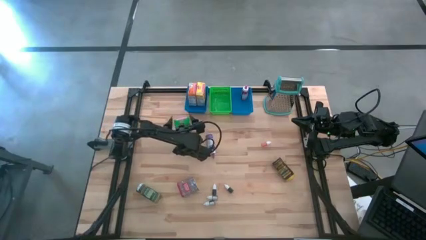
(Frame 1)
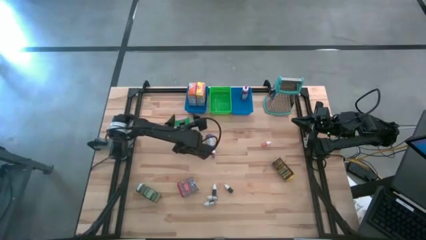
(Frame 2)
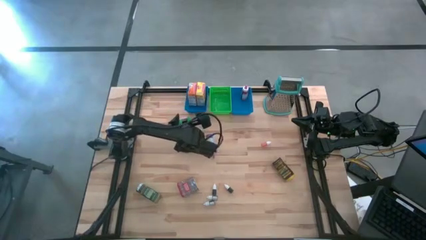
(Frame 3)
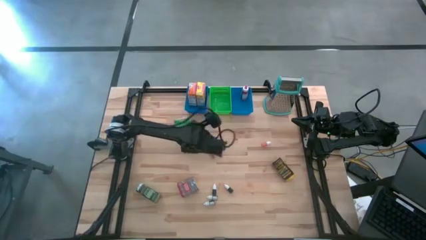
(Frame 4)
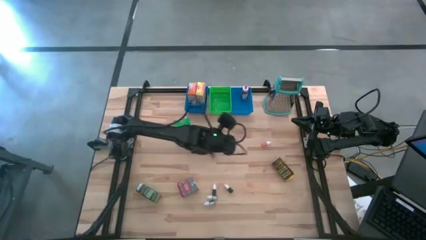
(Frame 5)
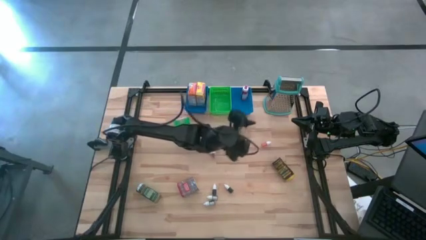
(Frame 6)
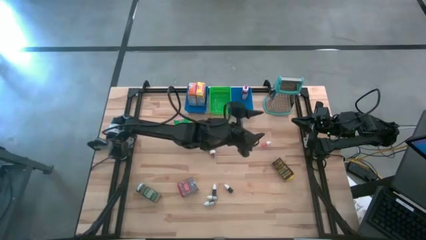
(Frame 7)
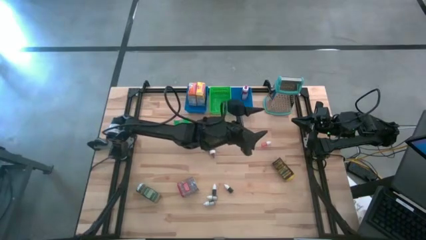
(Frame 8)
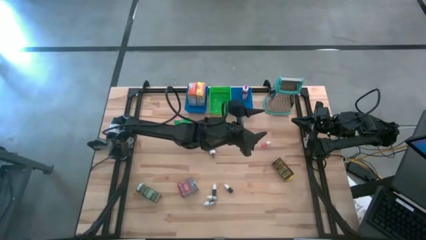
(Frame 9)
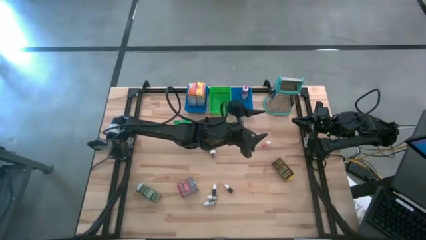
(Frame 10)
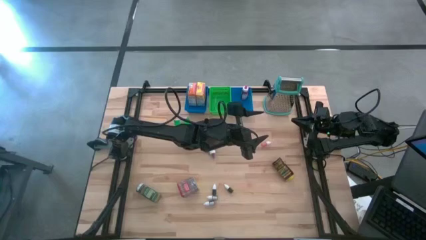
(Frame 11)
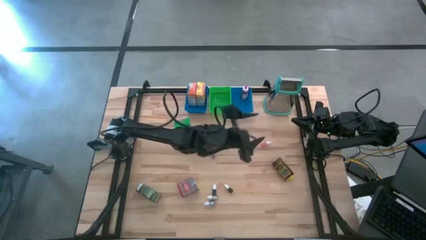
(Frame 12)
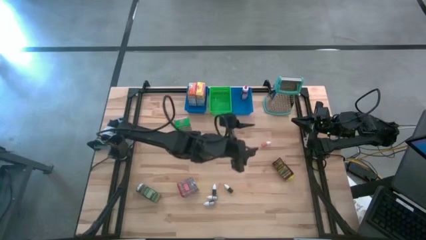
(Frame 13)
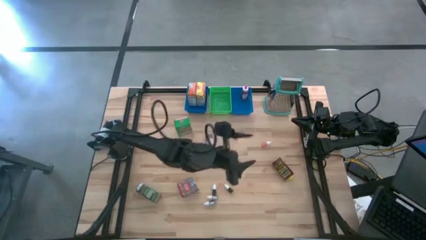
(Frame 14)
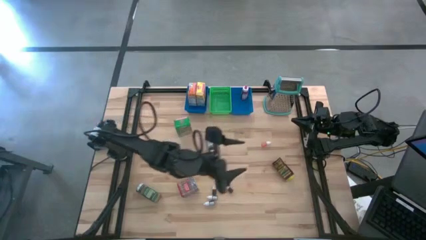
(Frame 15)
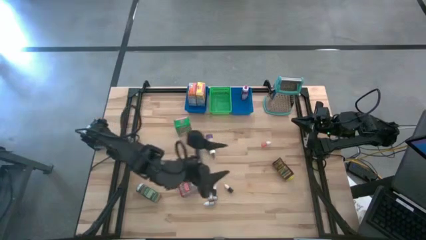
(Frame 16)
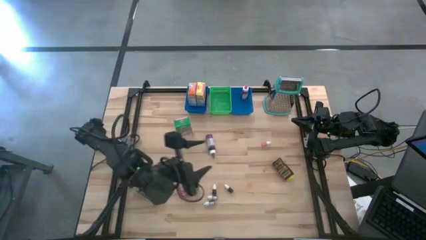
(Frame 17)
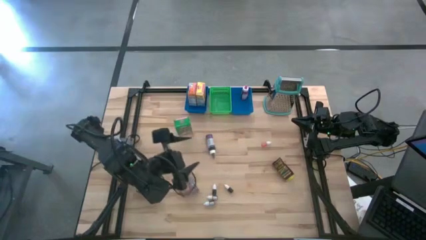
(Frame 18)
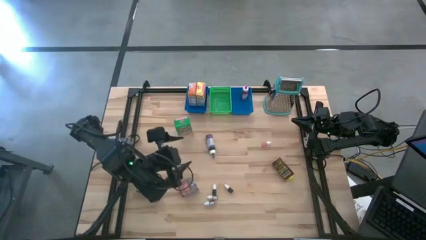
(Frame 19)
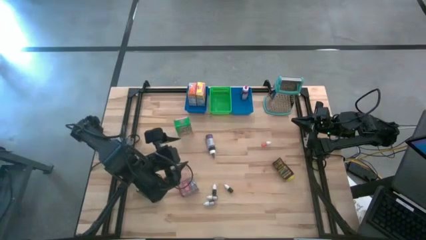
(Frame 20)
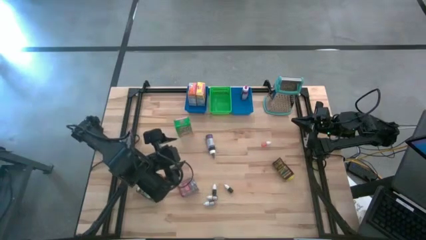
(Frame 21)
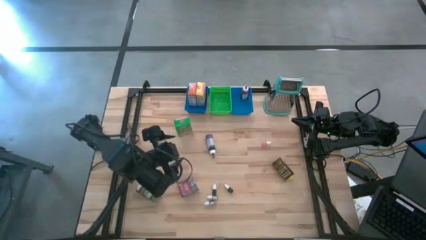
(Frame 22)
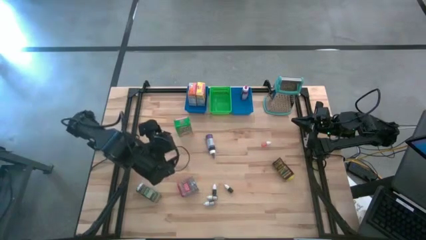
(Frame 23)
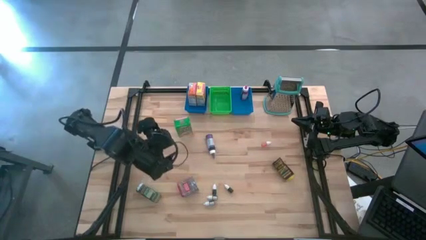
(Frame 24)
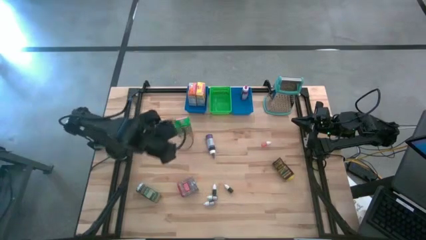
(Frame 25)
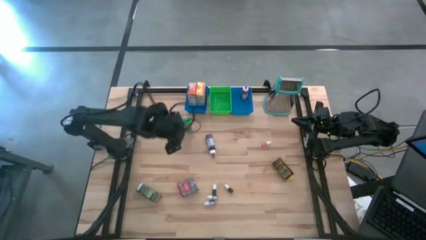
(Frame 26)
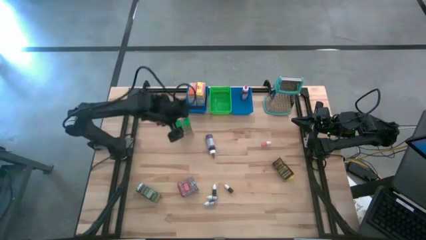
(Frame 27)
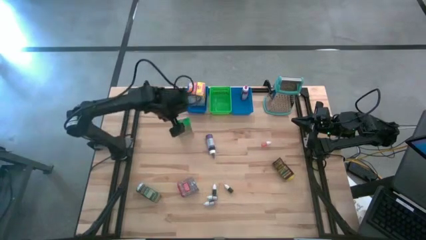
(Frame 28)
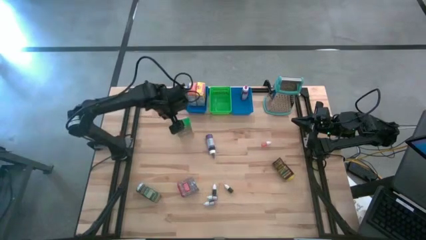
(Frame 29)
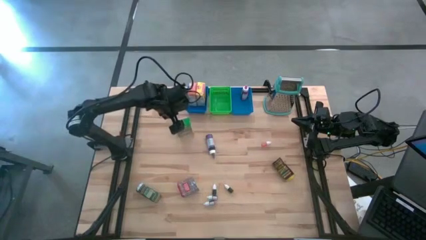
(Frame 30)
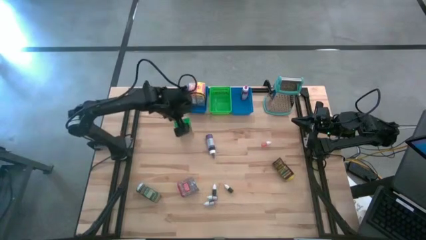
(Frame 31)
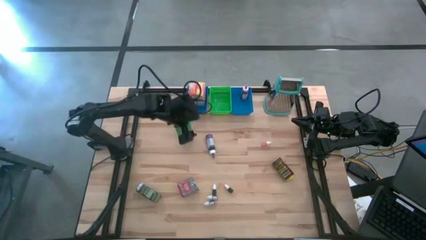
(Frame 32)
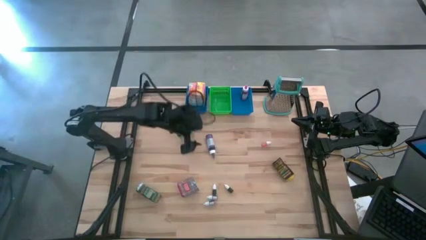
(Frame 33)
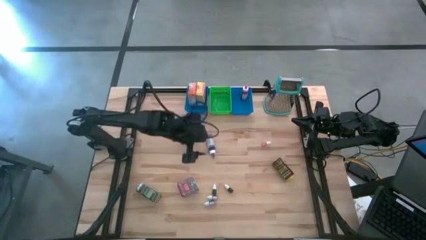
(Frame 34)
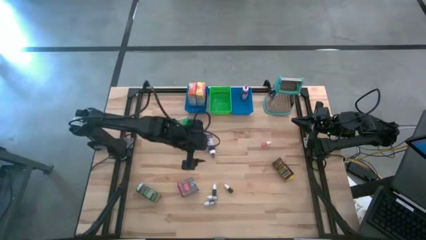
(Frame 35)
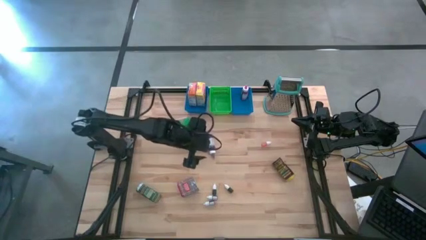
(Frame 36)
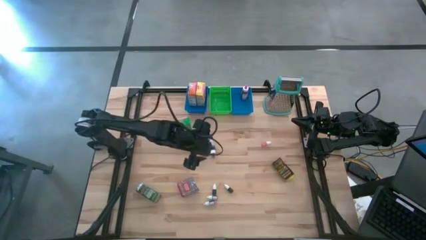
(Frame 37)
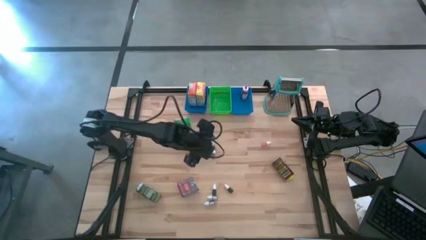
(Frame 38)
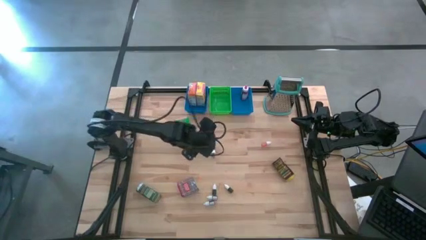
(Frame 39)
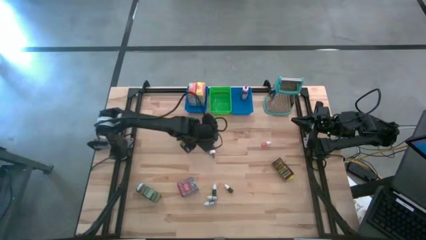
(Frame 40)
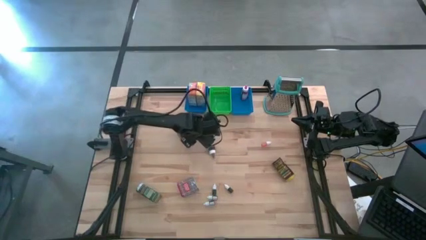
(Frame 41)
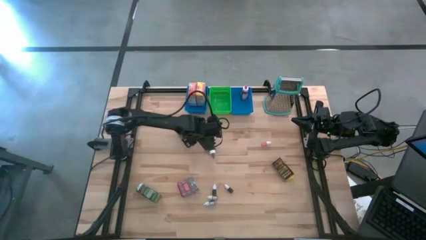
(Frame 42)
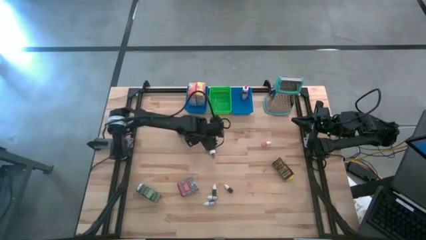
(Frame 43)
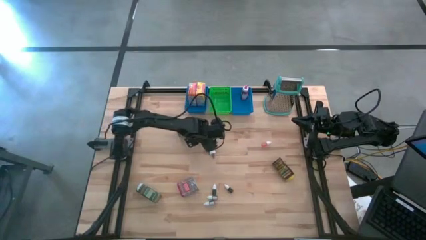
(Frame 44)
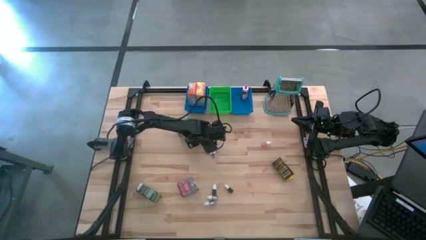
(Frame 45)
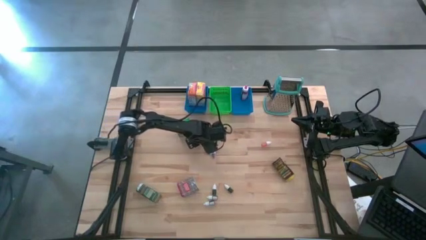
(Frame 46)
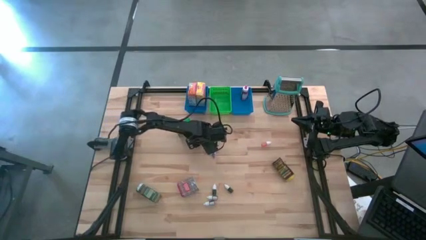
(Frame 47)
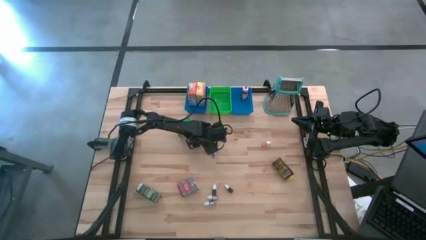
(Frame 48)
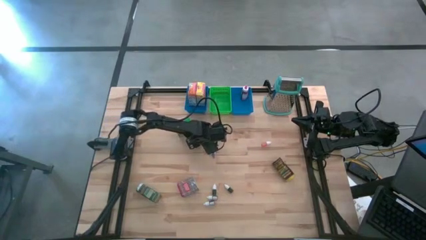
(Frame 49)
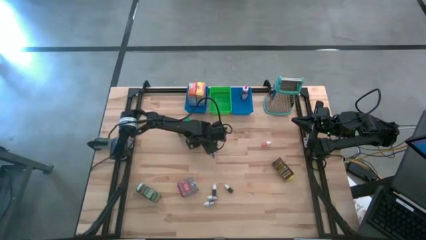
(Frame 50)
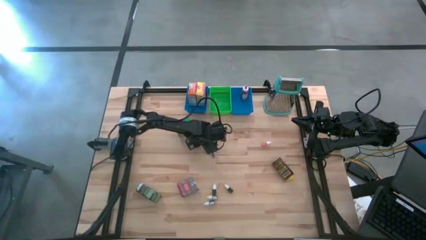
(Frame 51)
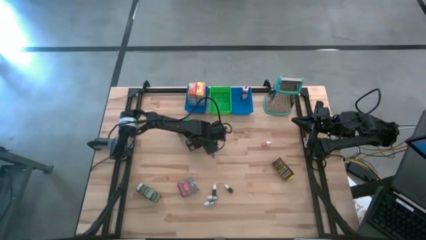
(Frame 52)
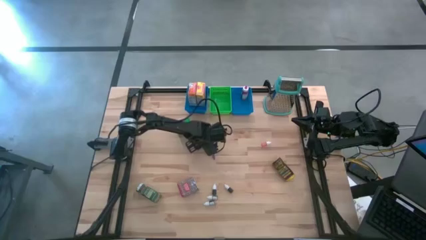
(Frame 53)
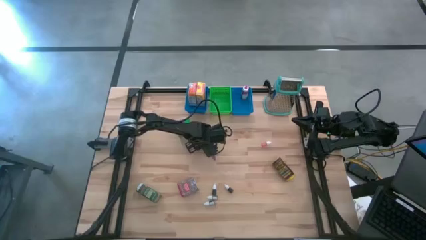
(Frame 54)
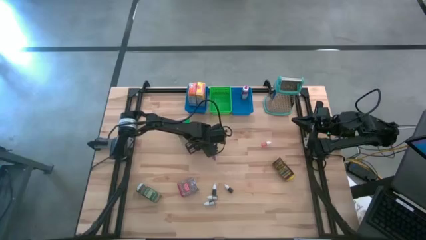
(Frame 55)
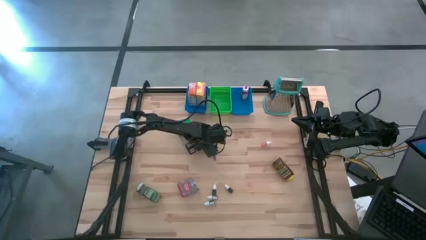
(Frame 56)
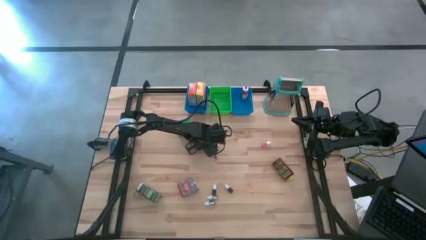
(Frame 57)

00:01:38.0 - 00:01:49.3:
Task: Pick & Place Kitchen Items
Put the large purple food coloring into the right blue bin

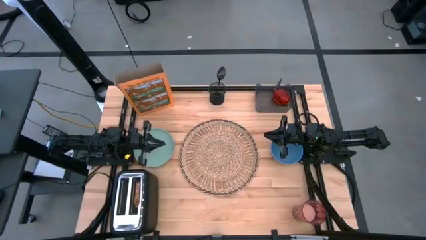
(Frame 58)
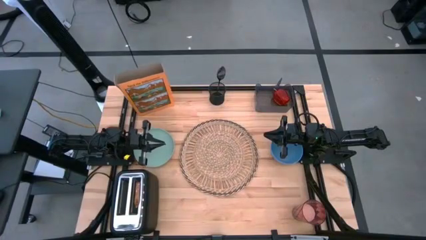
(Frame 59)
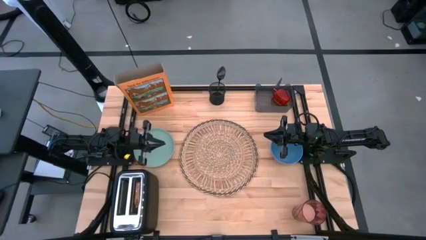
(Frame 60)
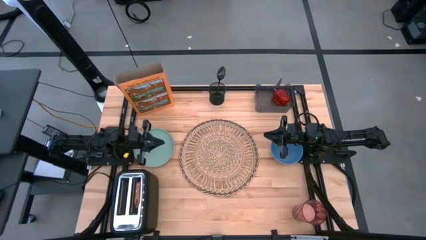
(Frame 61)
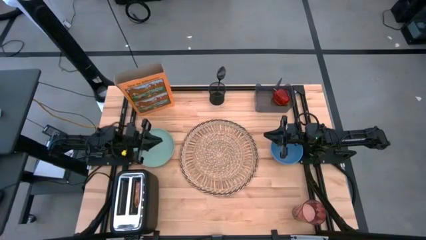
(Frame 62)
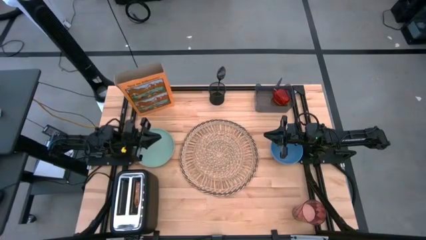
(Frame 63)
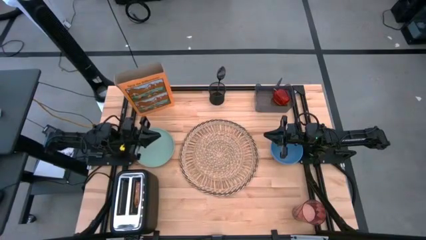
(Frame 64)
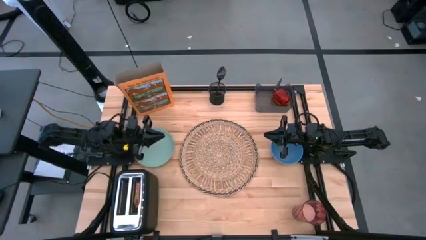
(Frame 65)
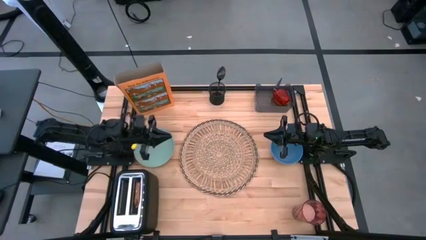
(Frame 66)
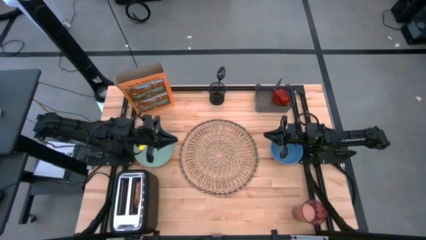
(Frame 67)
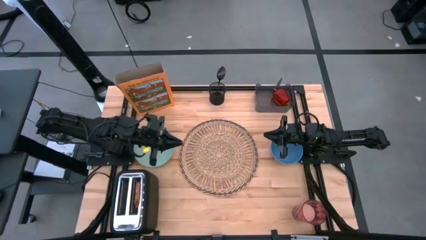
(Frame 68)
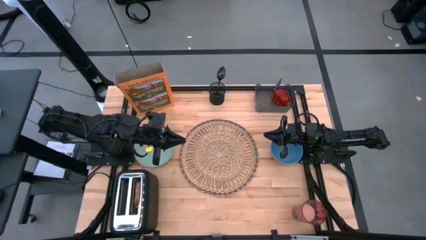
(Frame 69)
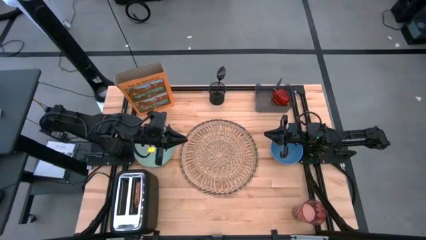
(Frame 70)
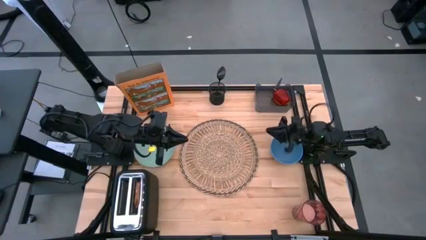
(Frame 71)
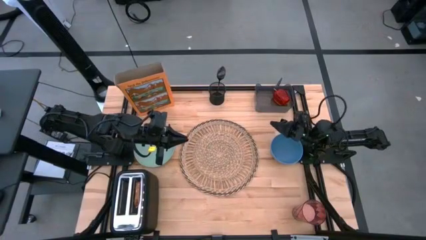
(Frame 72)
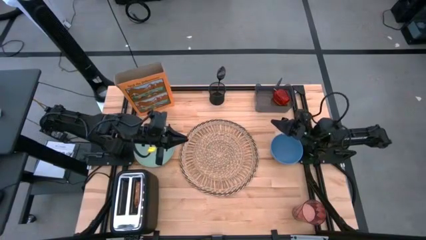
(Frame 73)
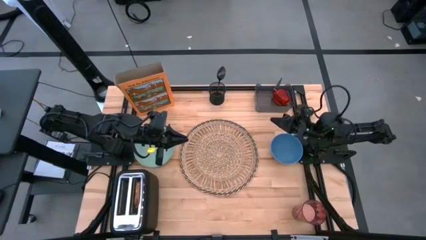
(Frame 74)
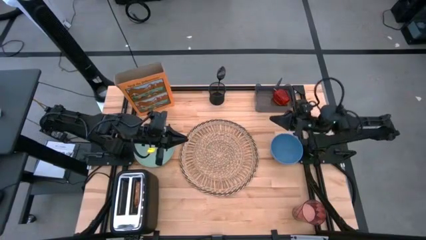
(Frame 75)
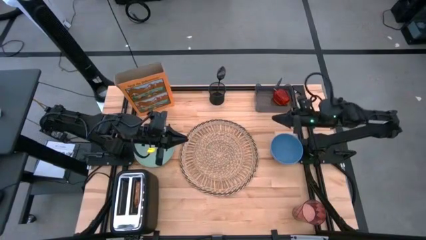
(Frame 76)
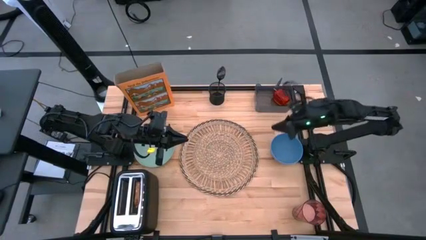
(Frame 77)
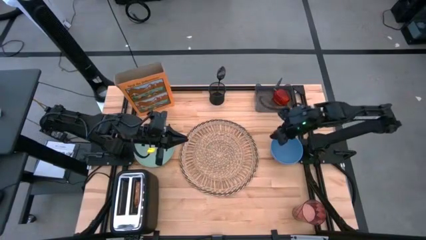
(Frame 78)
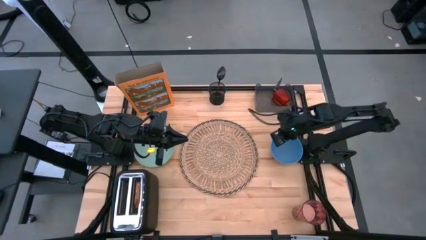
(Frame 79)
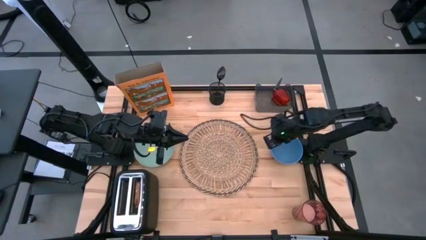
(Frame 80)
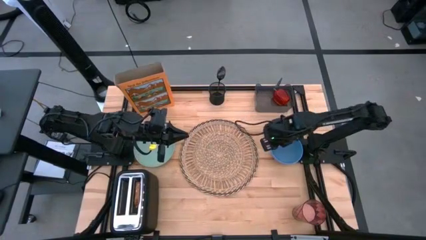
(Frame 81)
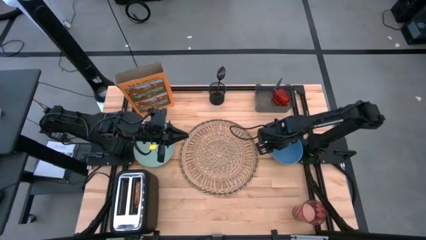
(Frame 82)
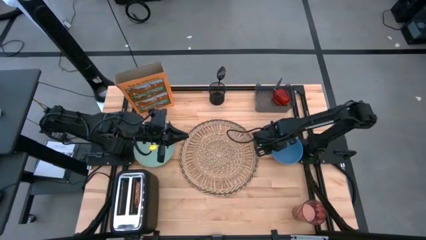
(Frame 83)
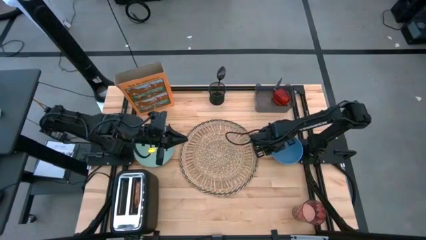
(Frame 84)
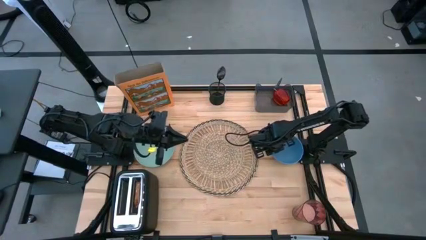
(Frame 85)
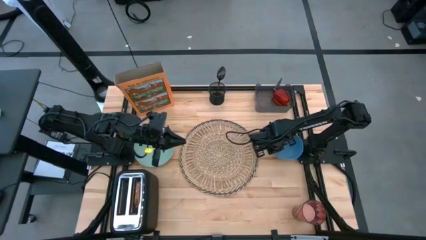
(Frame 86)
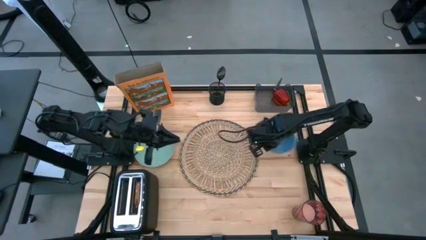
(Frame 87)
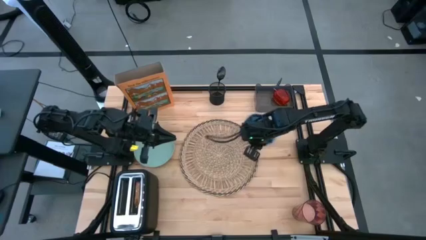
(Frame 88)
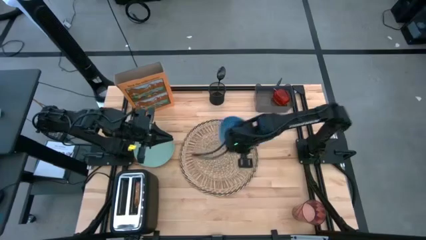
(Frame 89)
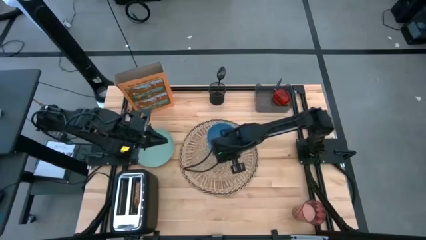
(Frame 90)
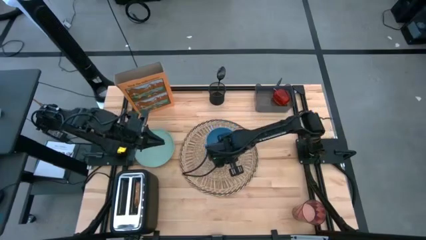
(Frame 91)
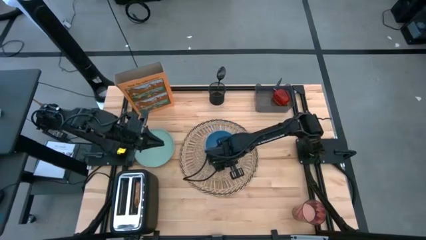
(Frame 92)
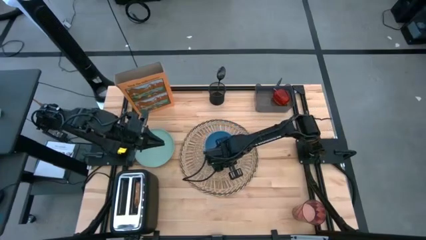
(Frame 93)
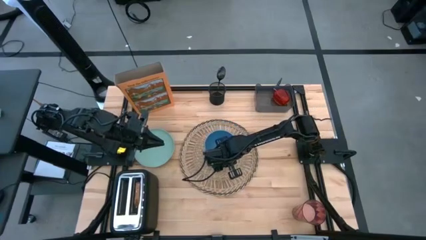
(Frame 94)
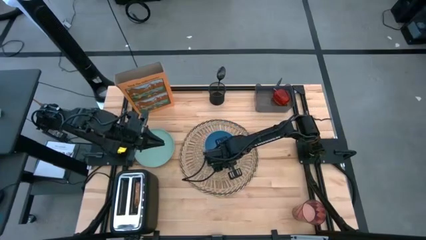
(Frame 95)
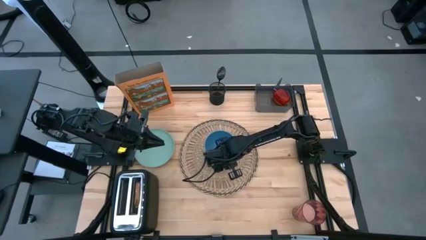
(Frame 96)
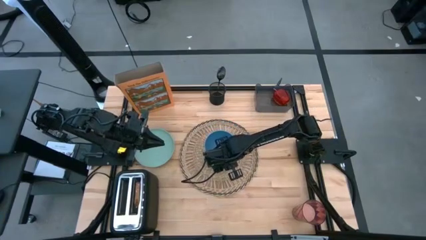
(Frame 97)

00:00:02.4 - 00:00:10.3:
Task: Arrange a breakfast setting
Put the blue bowl on the brown table mat
